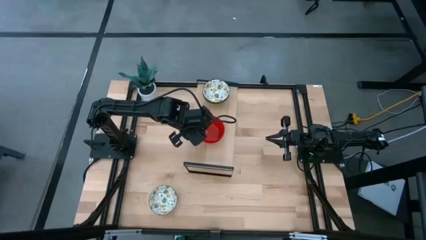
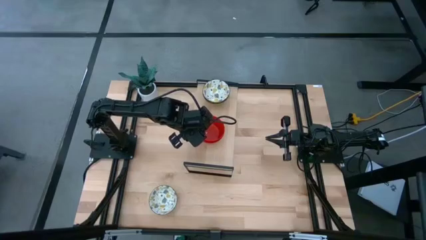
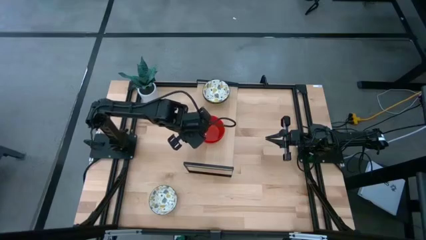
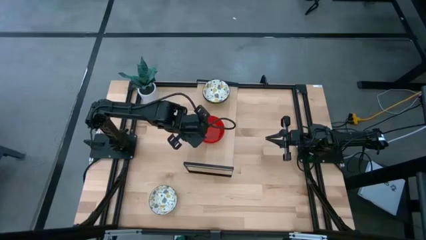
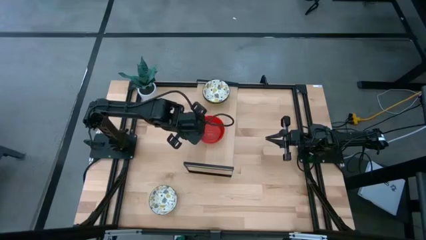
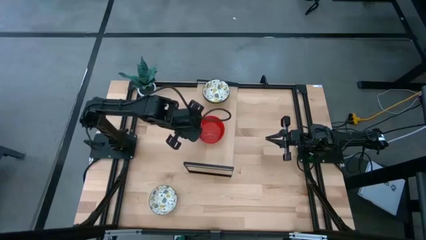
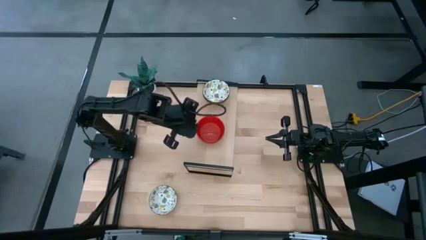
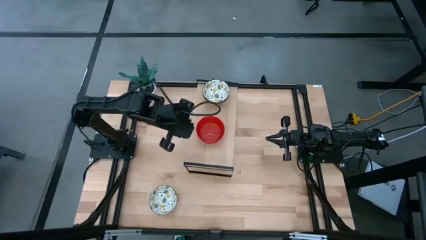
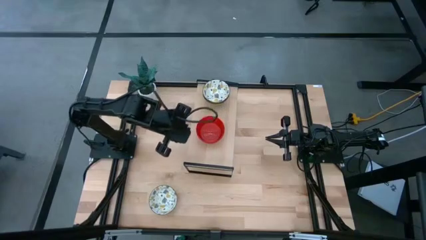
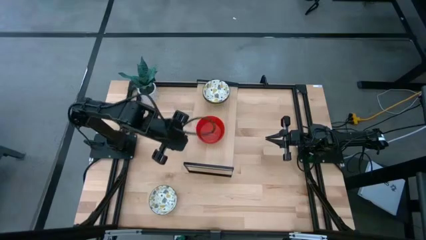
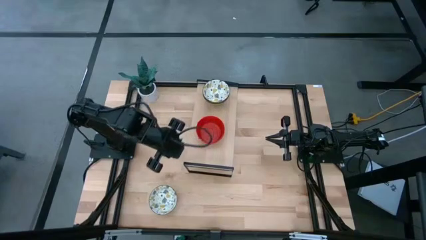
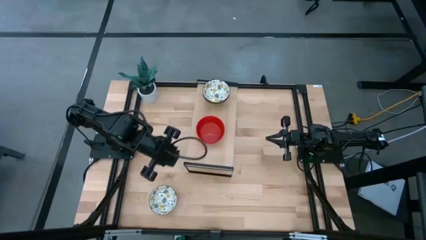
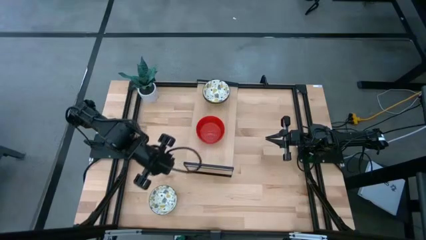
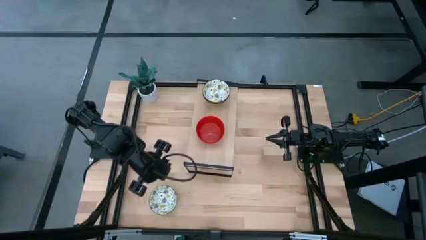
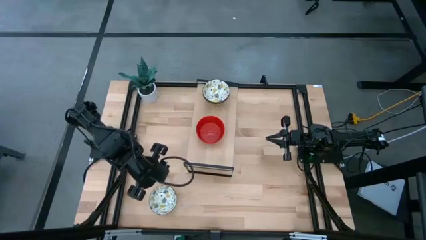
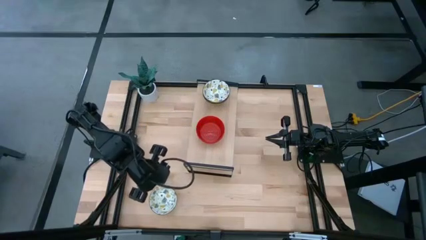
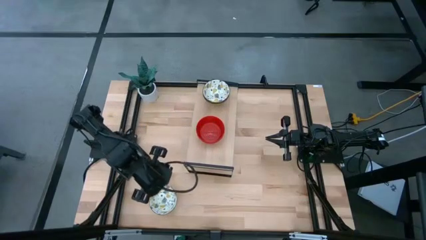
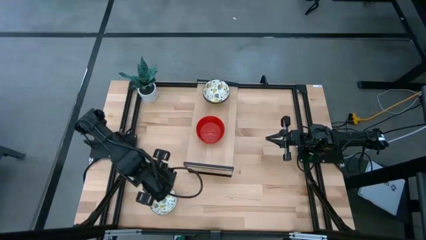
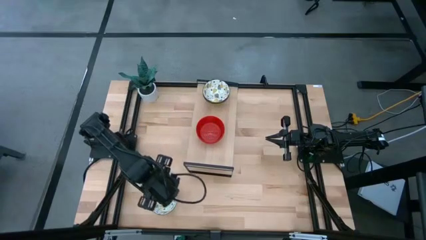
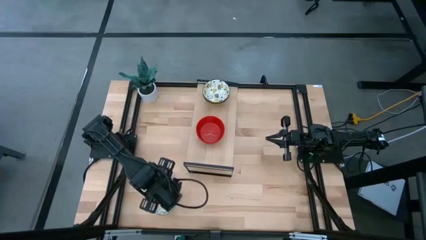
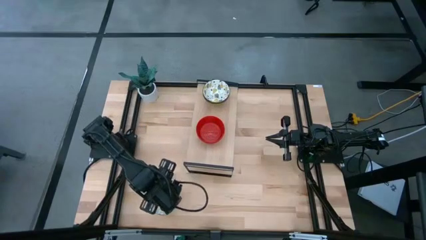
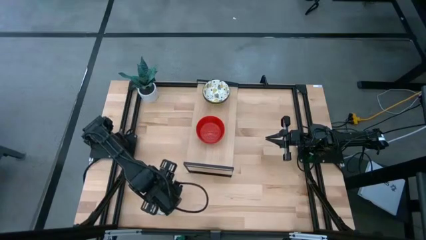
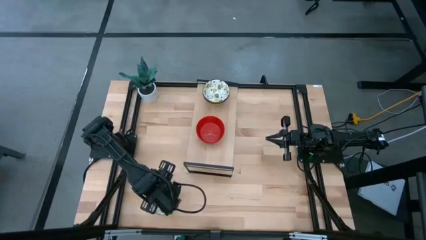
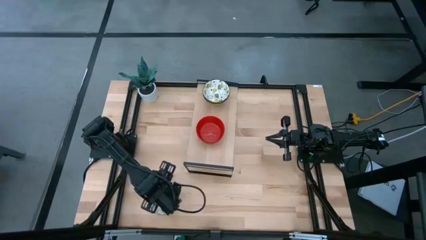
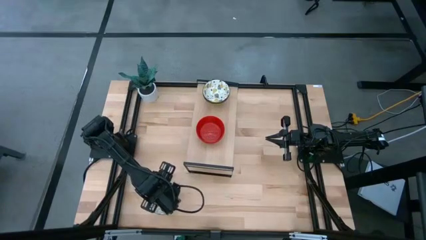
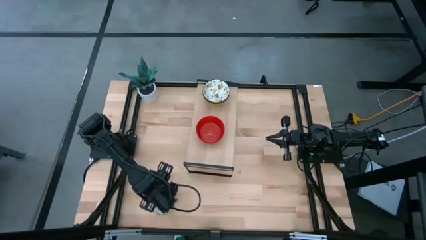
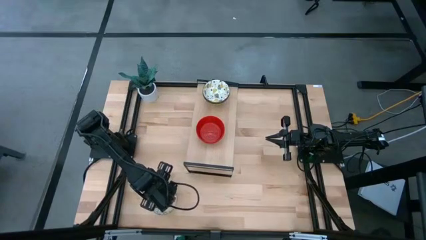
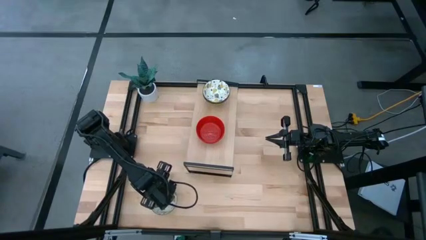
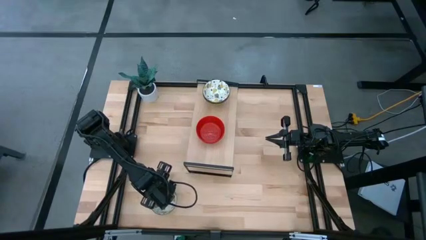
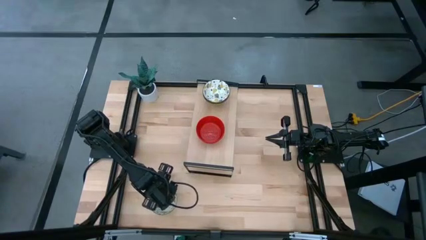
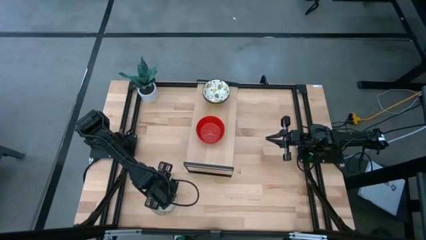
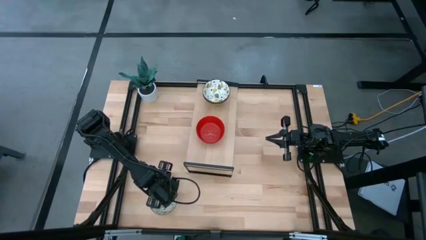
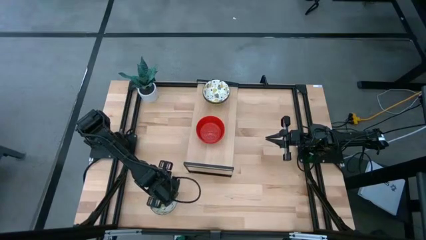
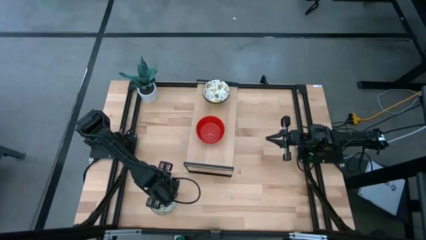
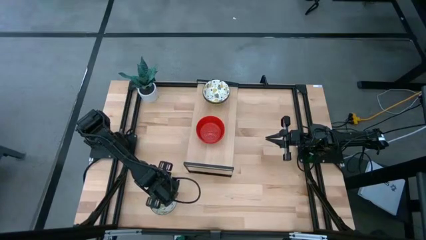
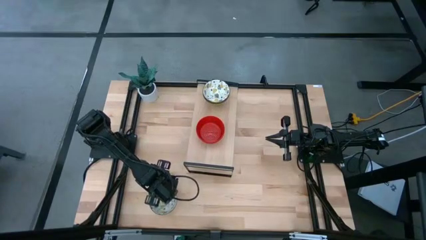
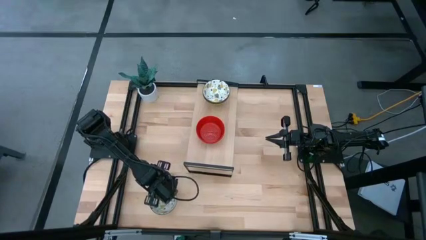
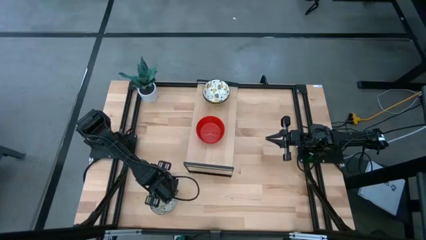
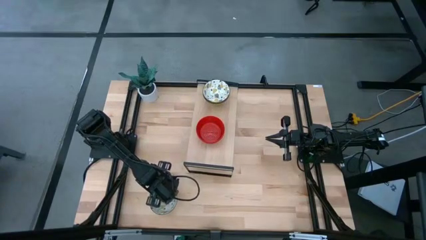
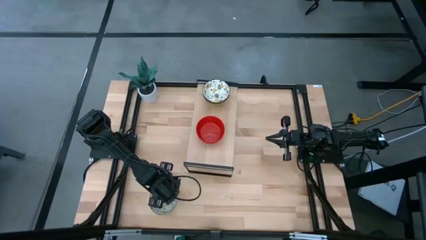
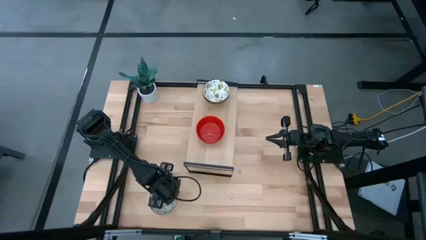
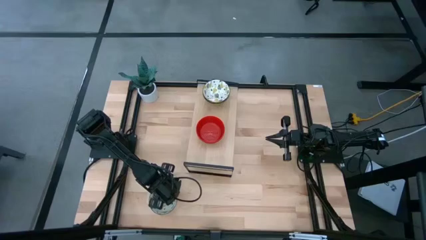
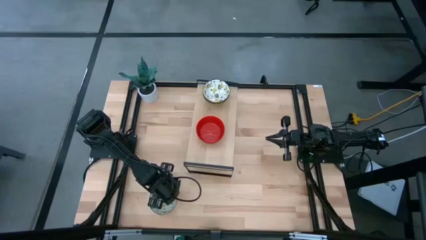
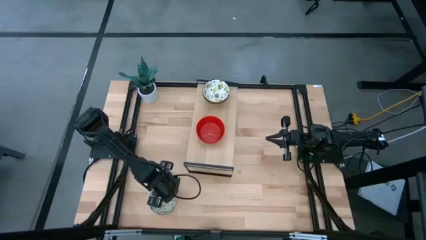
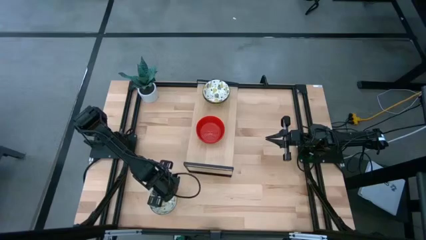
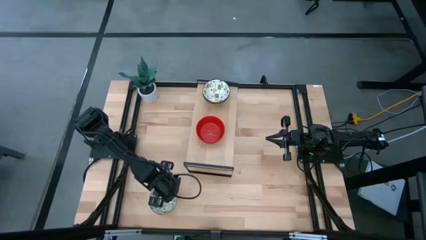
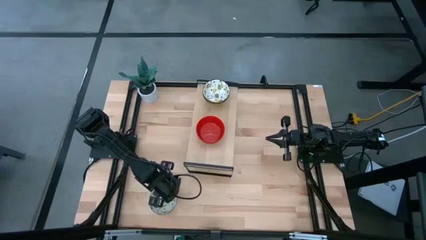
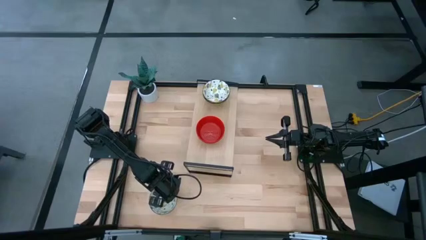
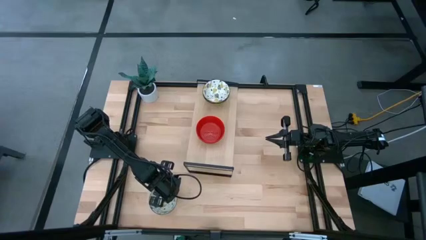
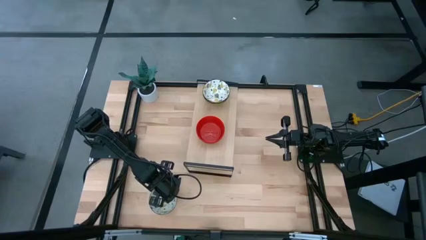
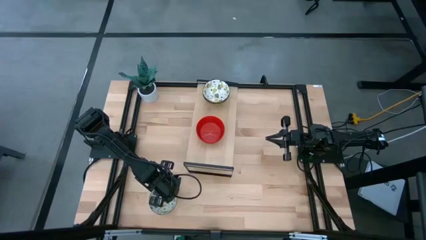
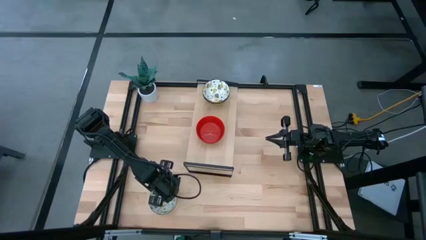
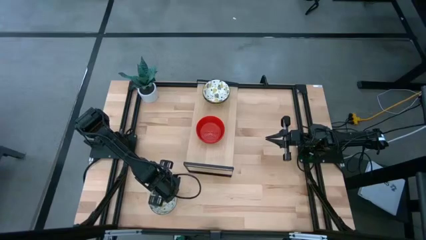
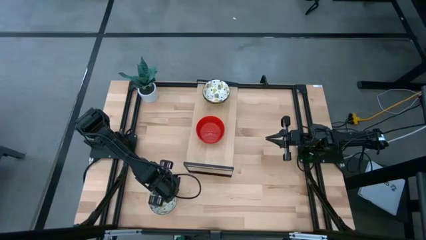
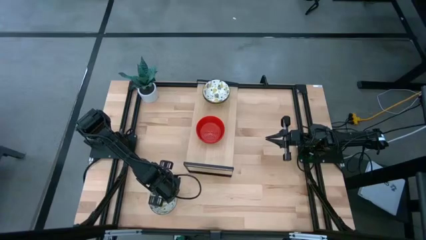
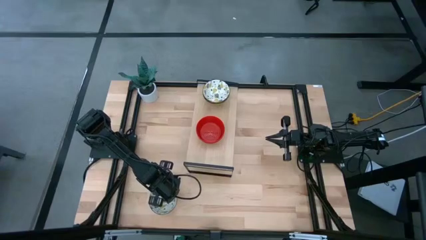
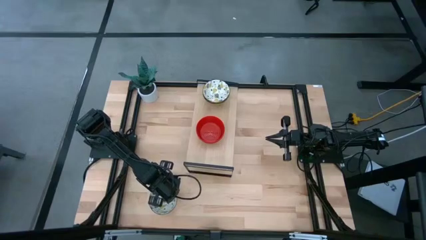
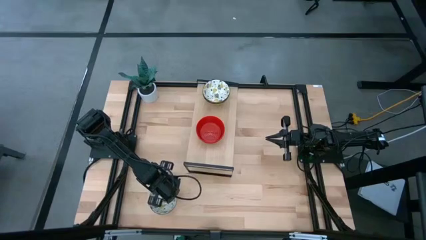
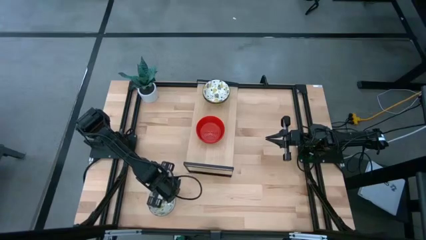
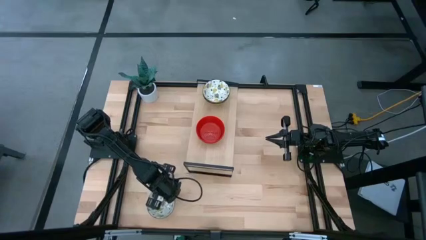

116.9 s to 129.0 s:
Task: Pick & Place Mini bowls
Stack the white patterned bowl on top of the white patterned bowl on the shelf

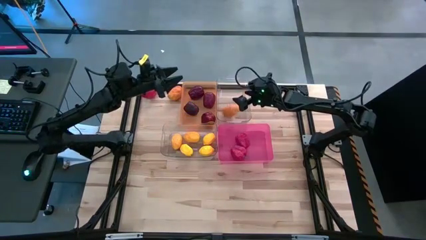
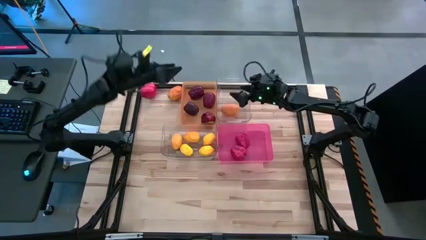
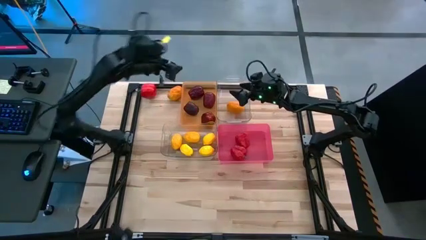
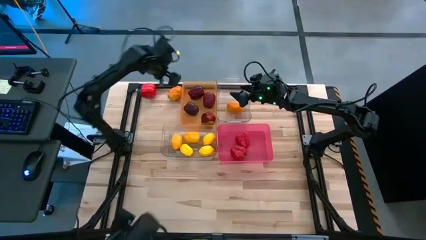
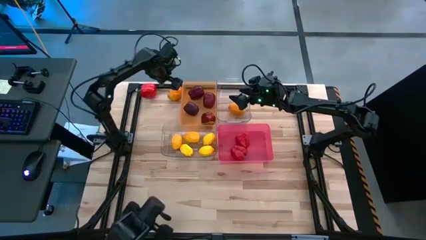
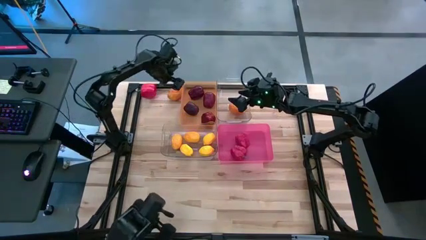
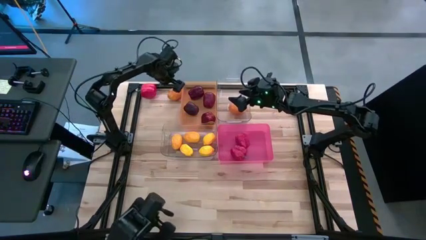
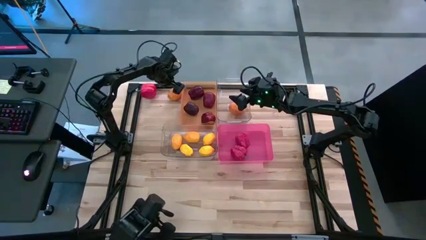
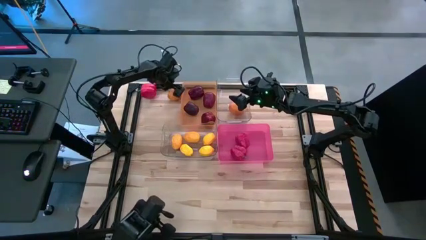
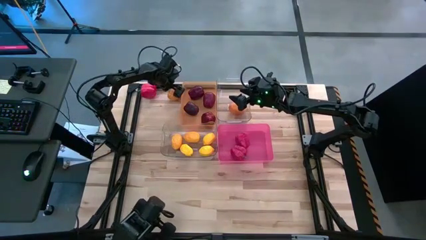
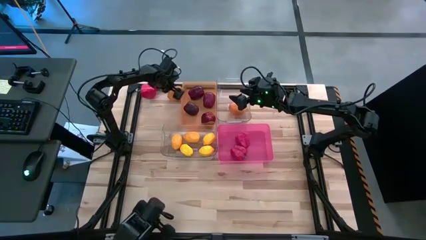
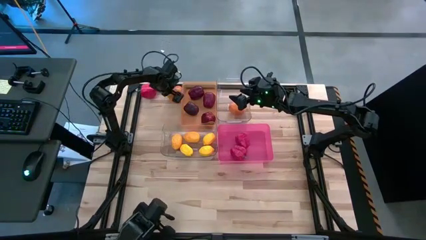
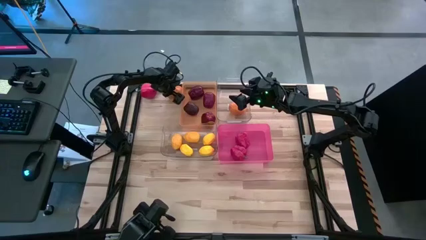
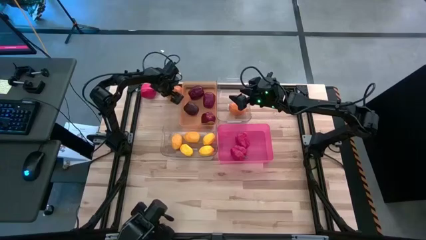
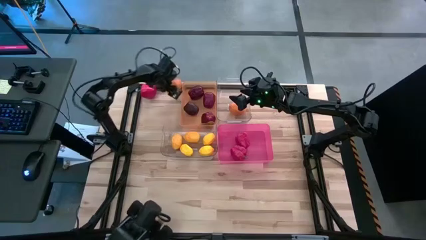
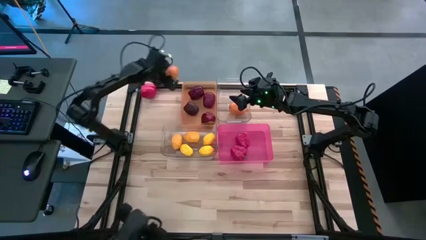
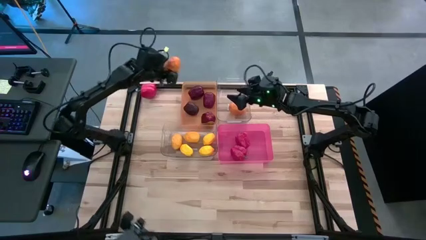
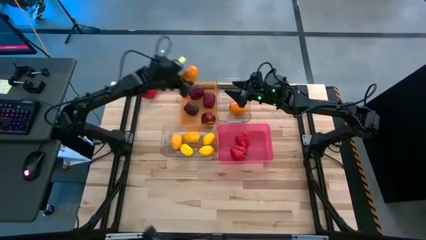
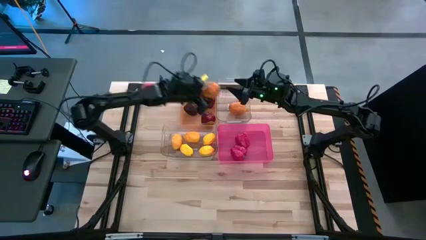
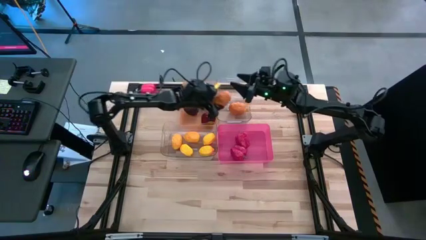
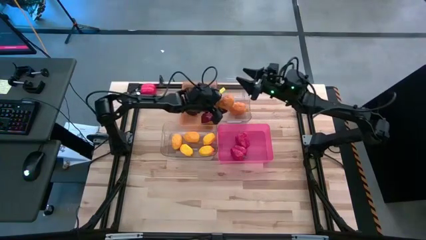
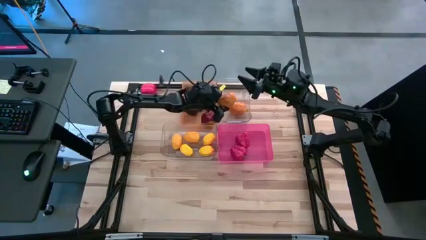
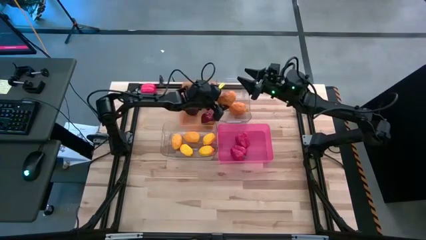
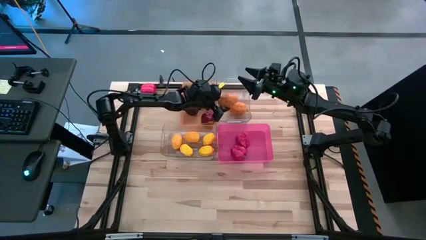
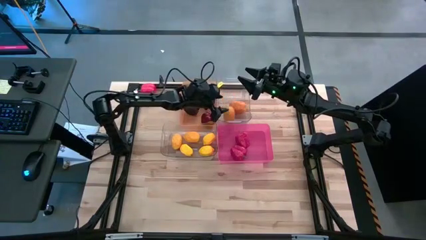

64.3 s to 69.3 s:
Task: Sort produce into baskets
Put the yellow potato into the top transparent bin
